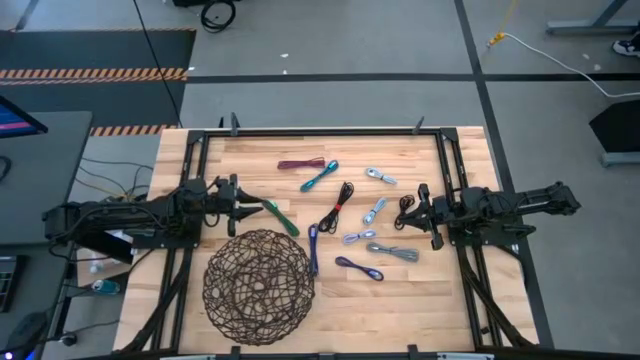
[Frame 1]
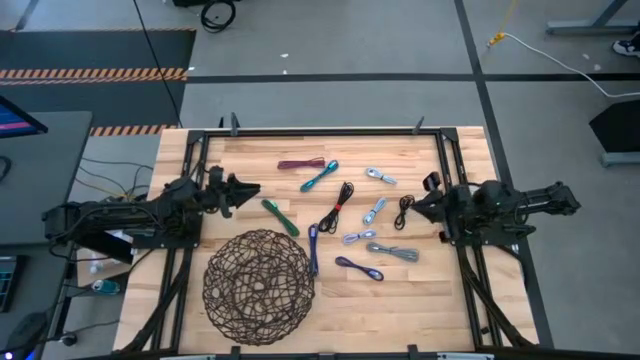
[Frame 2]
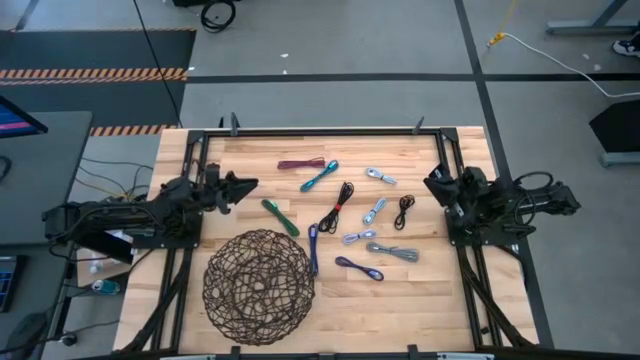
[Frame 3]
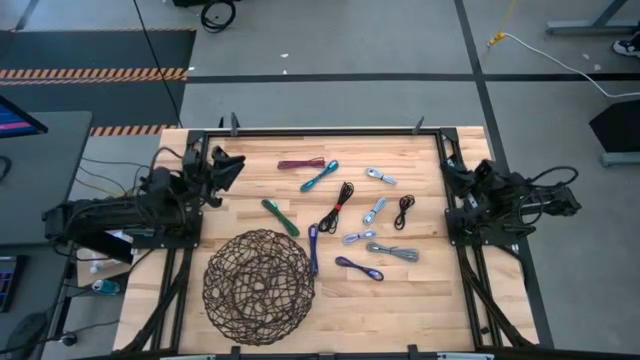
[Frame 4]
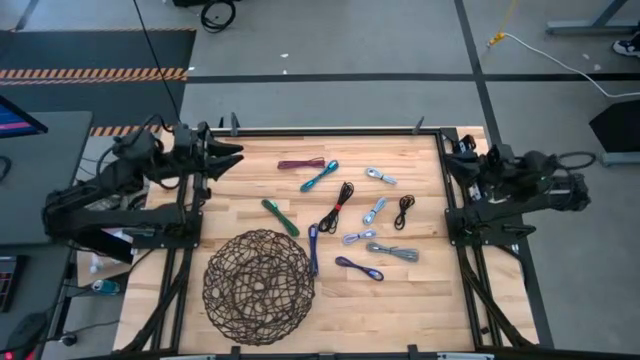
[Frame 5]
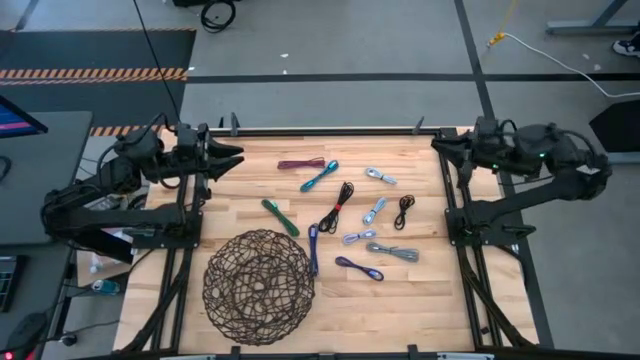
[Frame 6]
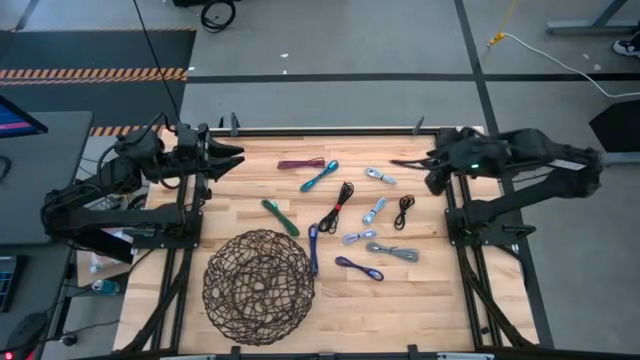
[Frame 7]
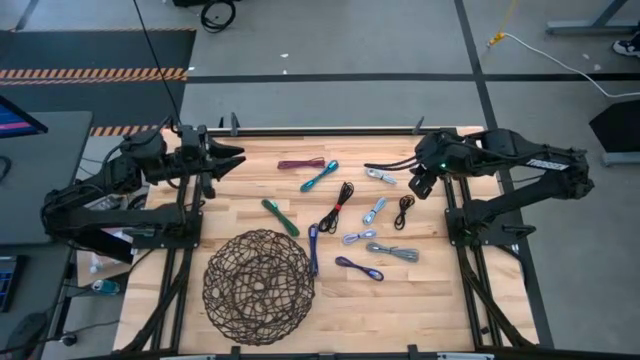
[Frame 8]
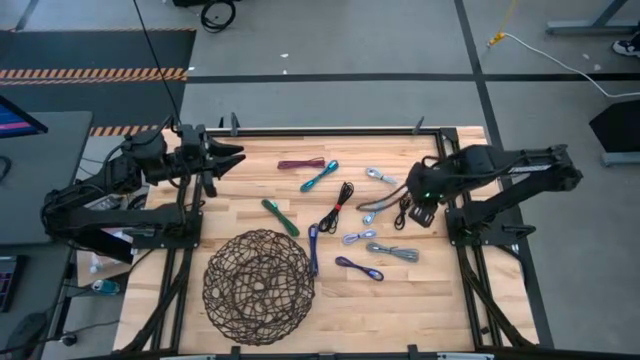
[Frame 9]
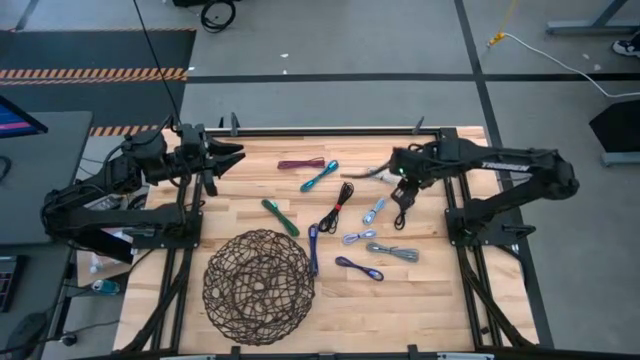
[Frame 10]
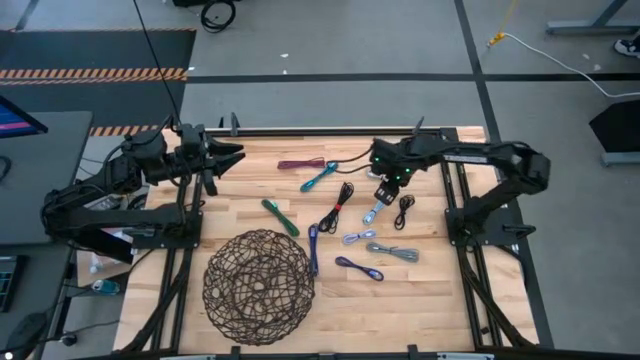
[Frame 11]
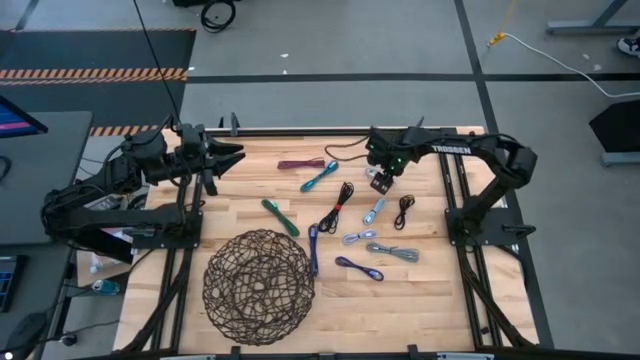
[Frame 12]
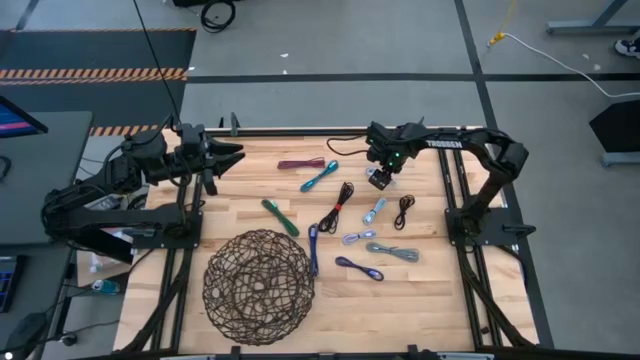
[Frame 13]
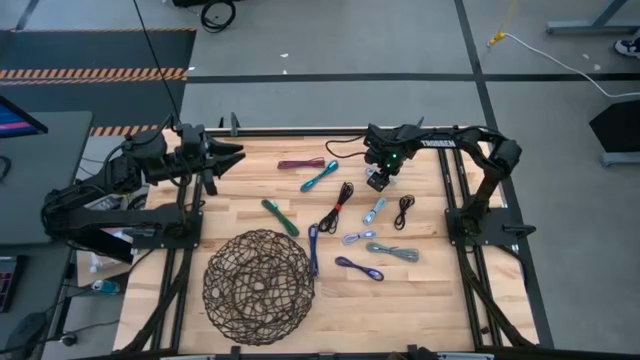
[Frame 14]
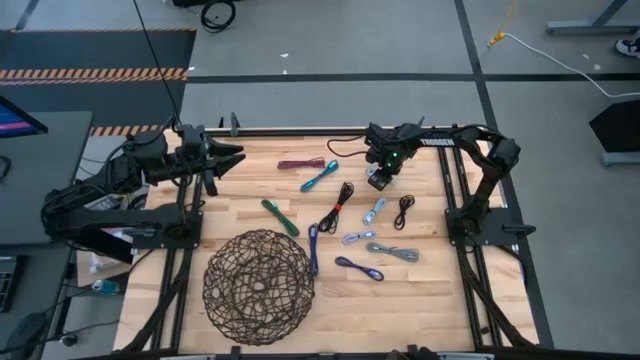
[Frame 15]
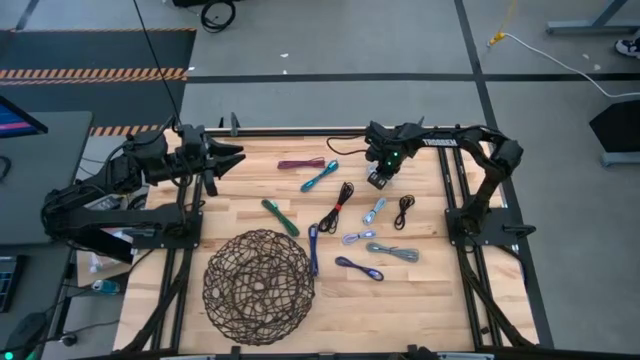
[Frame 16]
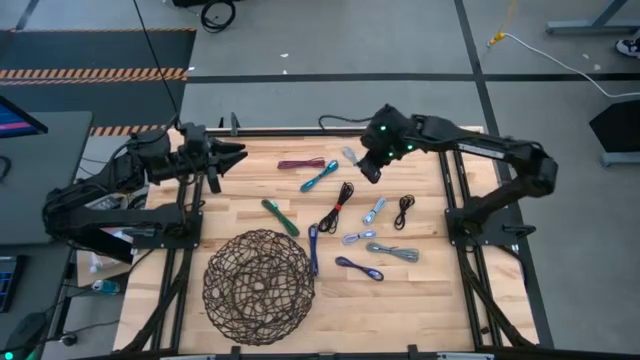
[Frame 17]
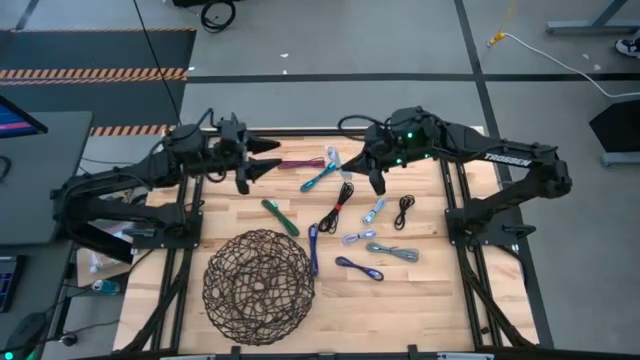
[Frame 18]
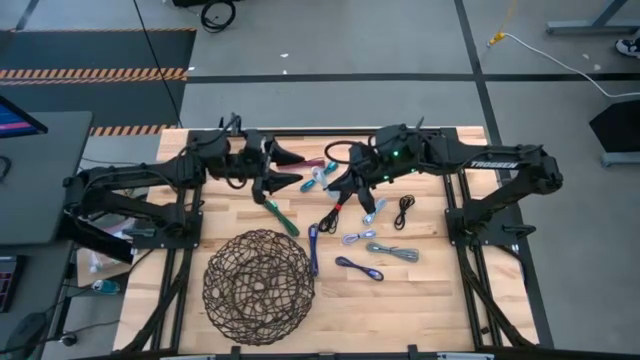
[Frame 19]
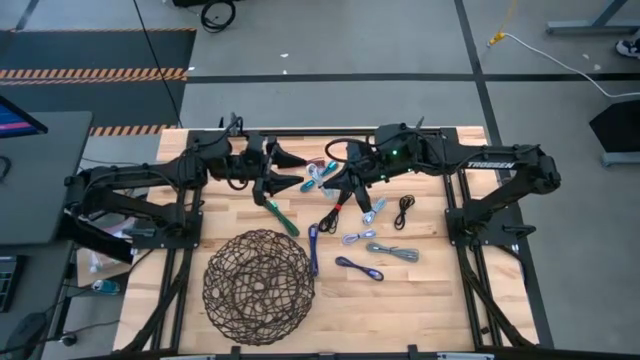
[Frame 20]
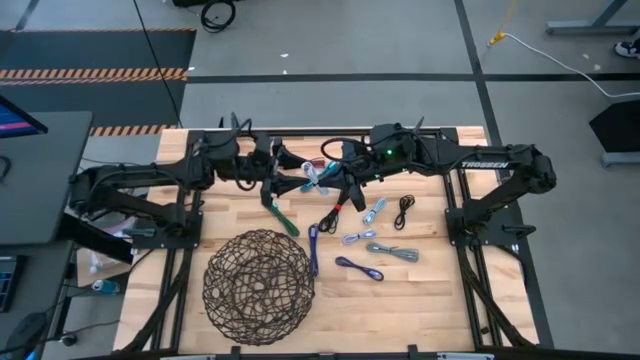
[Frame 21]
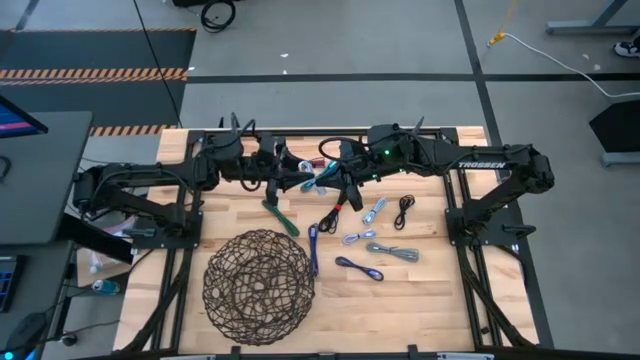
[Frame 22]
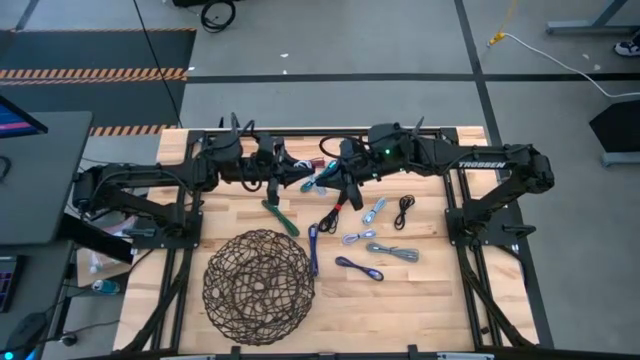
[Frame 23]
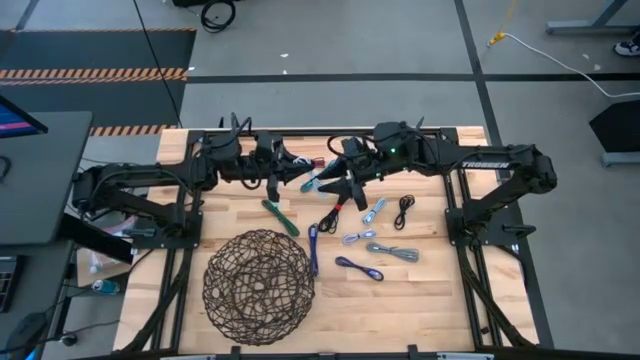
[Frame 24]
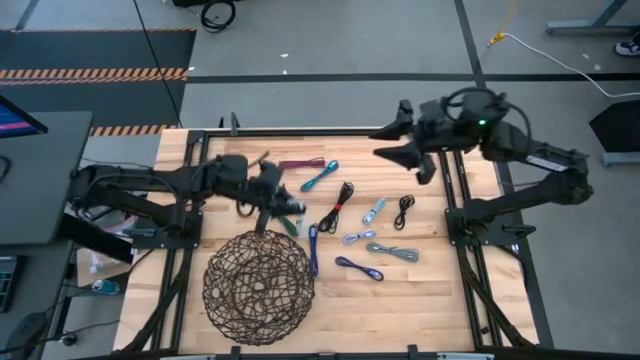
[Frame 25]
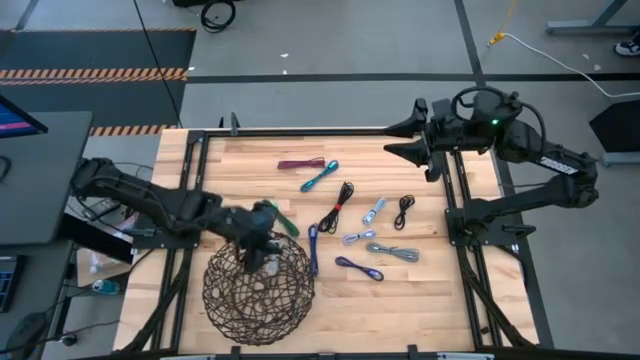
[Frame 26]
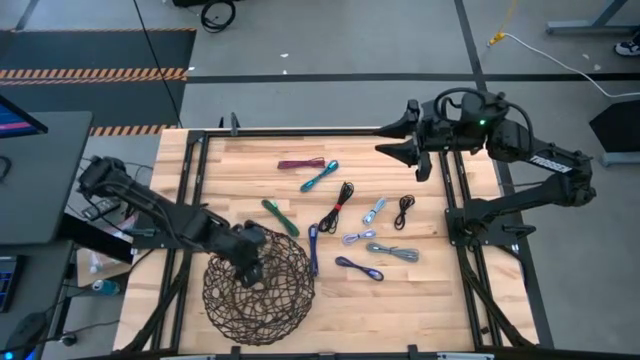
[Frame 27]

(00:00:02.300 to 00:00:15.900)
Task: Pick and place USB-C Cables
Put the top white charger cable into the wire basket

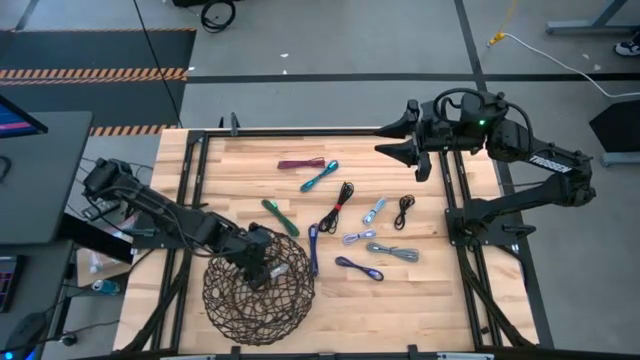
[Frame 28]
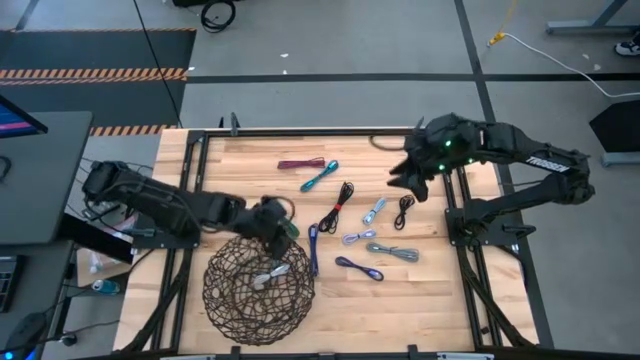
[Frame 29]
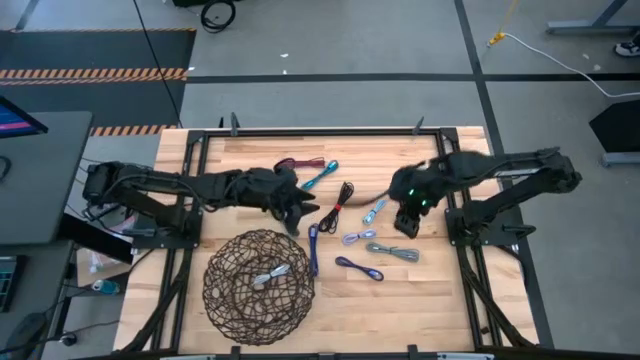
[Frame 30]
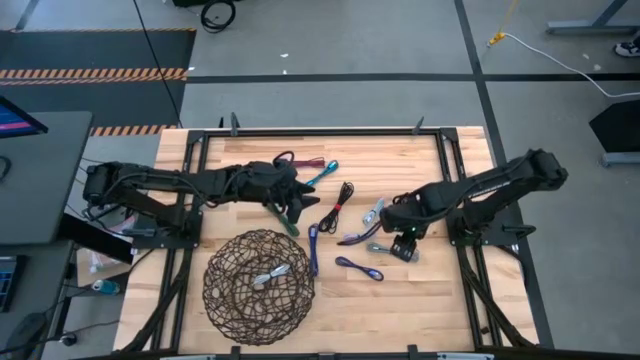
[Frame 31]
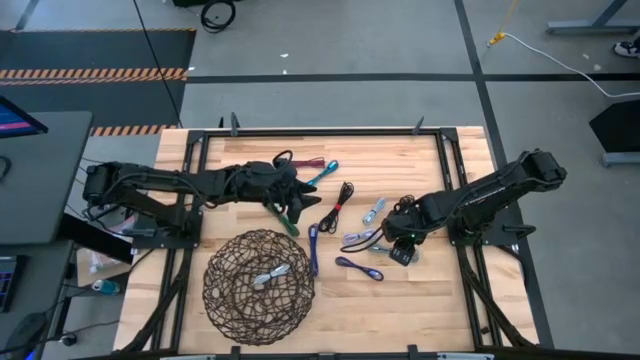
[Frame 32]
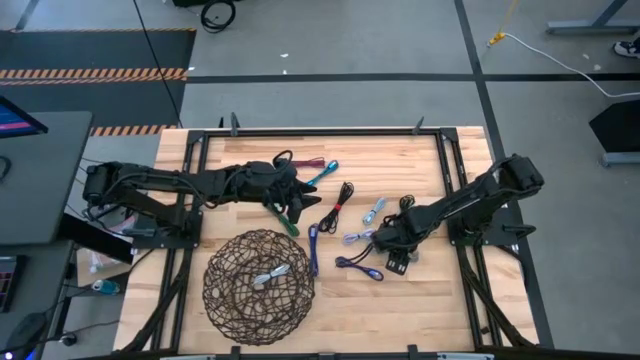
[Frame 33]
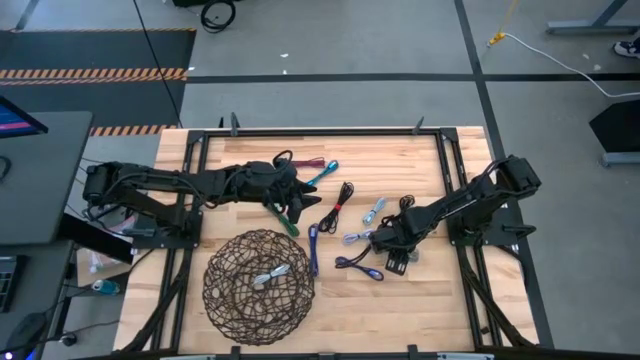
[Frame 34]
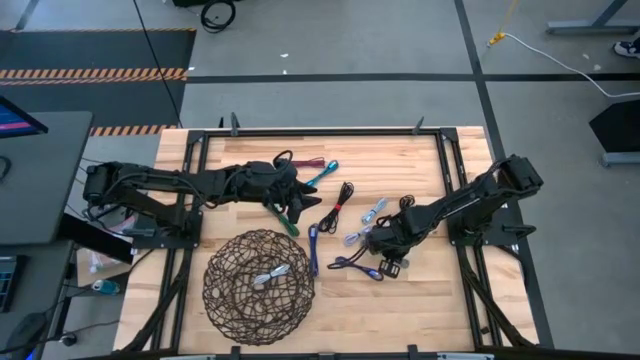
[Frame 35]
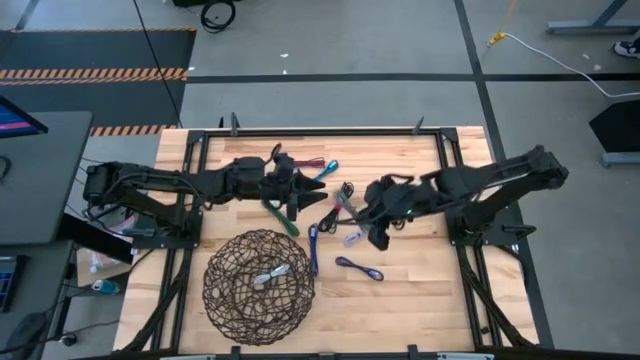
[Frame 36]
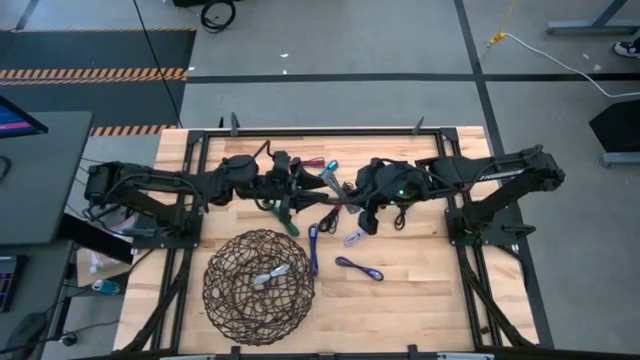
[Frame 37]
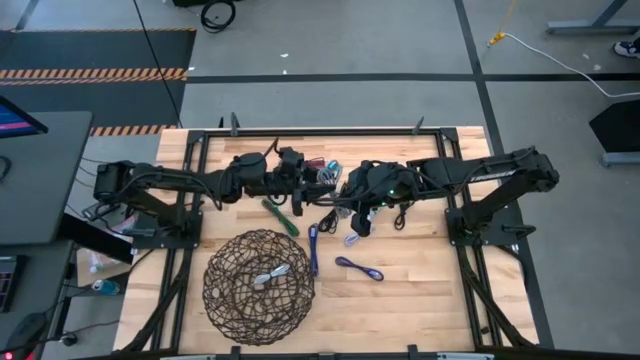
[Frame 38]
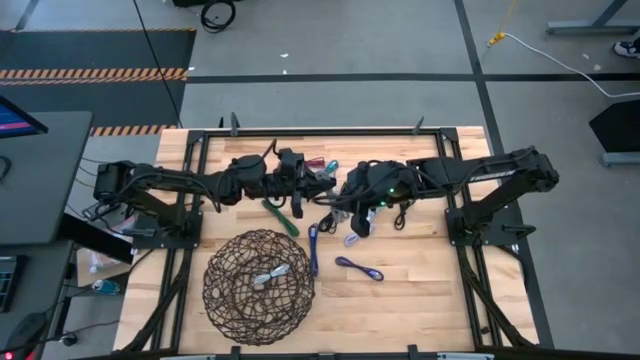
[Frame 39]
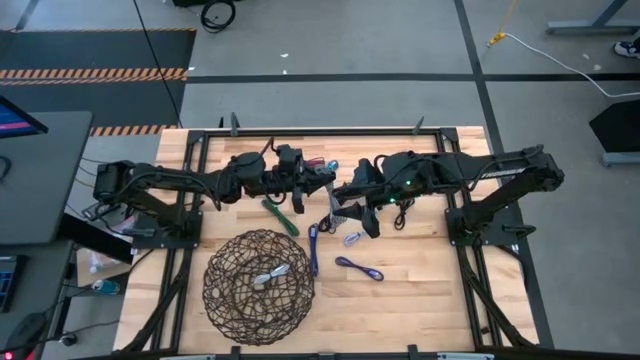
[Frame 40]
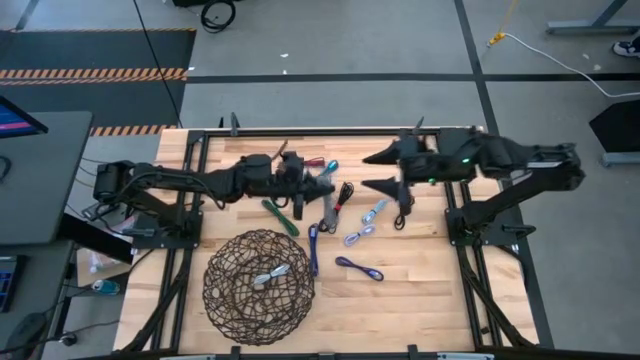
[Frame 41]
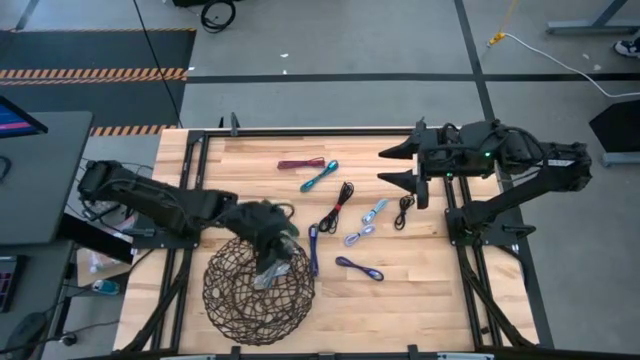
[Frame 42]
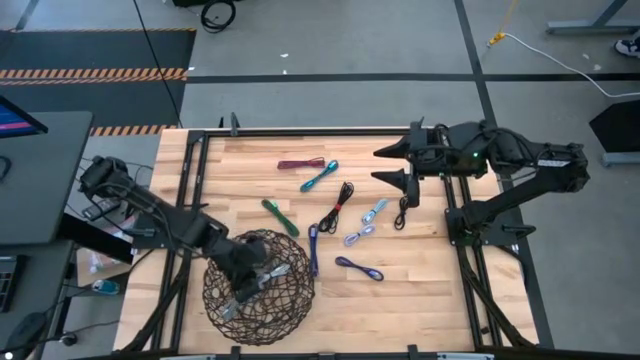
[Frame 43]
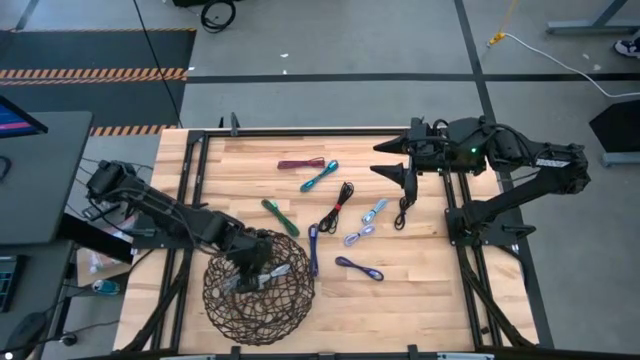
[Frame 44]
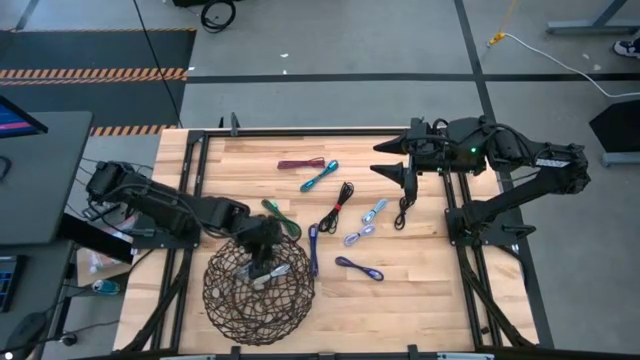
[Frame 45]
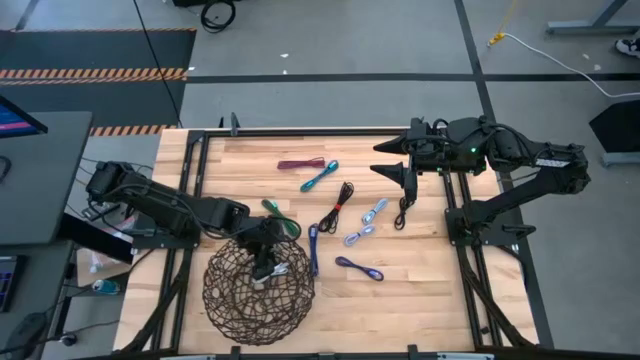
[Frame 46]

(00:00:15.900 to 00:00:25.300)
Put the black and white charger cable into the wire basket
